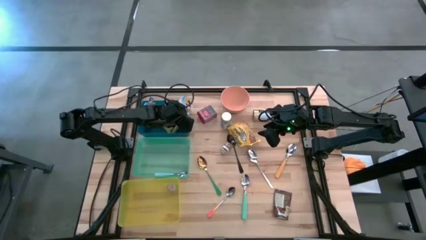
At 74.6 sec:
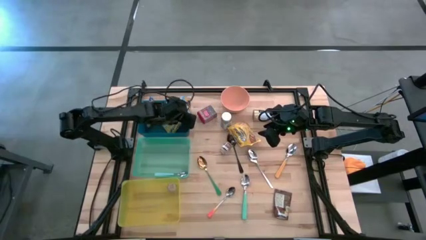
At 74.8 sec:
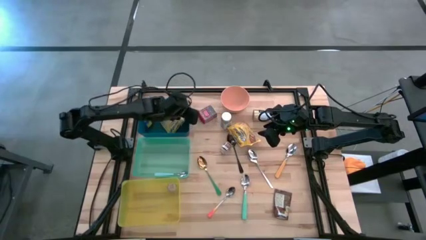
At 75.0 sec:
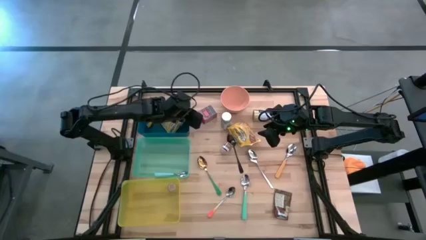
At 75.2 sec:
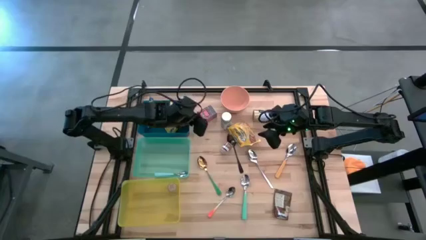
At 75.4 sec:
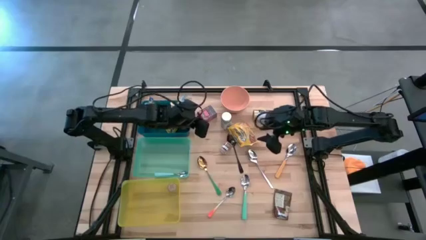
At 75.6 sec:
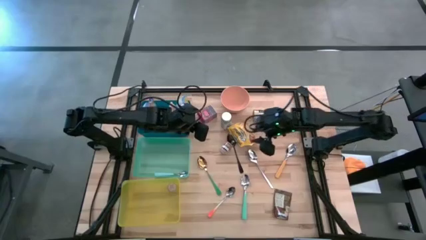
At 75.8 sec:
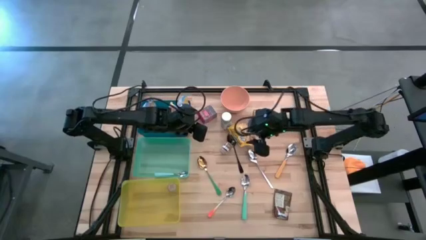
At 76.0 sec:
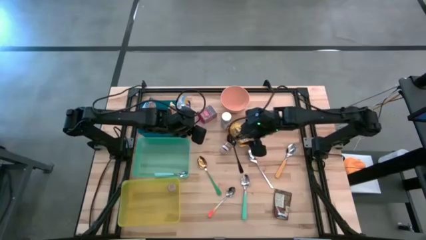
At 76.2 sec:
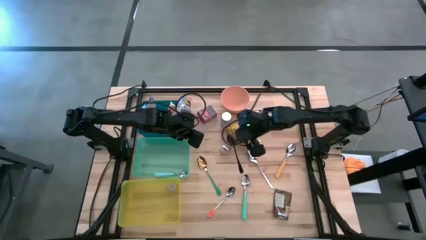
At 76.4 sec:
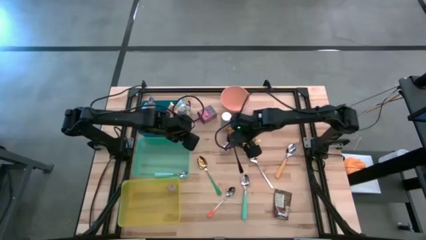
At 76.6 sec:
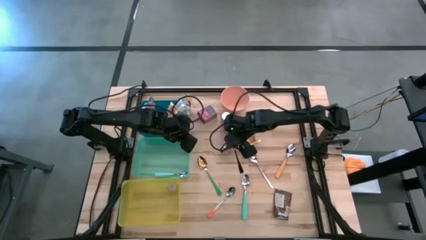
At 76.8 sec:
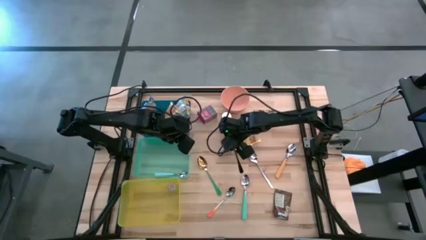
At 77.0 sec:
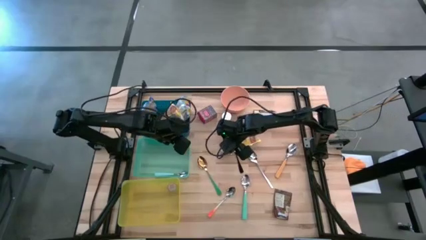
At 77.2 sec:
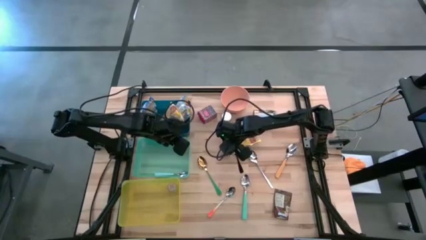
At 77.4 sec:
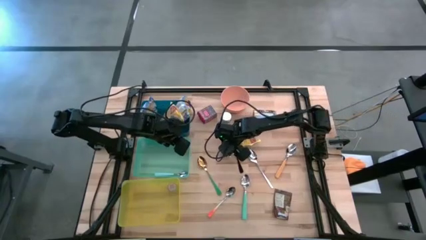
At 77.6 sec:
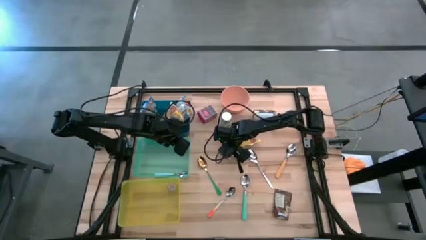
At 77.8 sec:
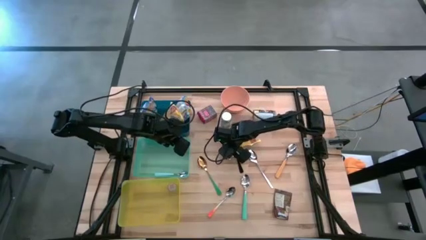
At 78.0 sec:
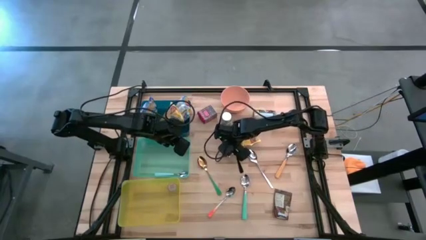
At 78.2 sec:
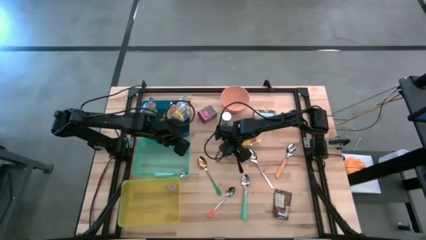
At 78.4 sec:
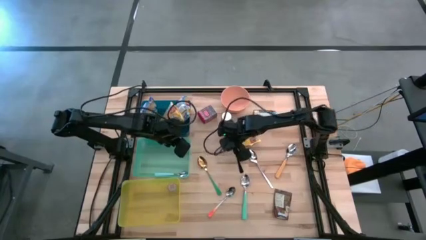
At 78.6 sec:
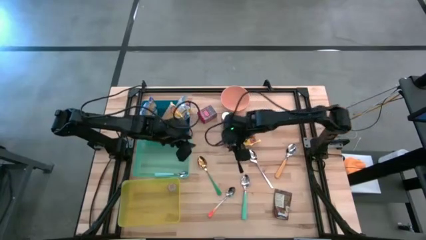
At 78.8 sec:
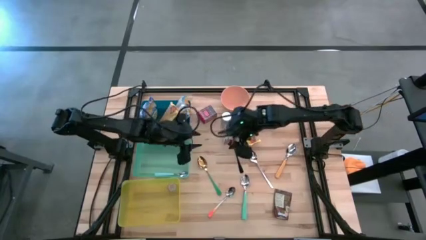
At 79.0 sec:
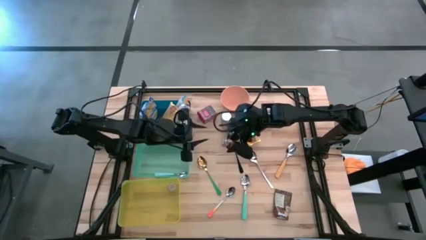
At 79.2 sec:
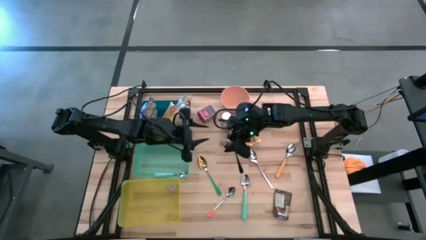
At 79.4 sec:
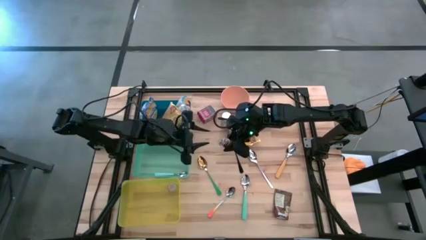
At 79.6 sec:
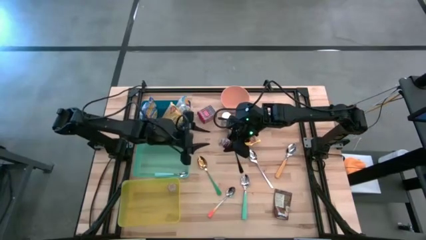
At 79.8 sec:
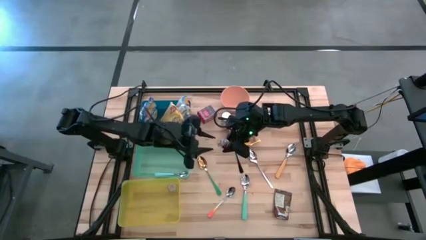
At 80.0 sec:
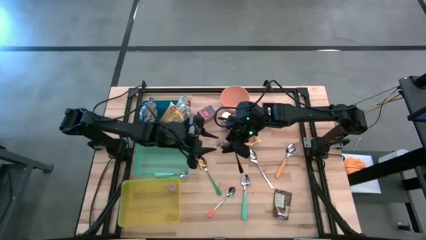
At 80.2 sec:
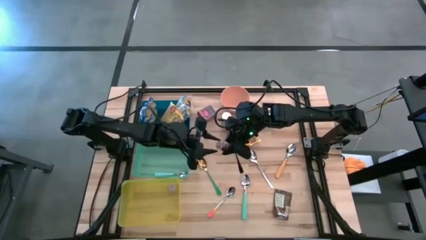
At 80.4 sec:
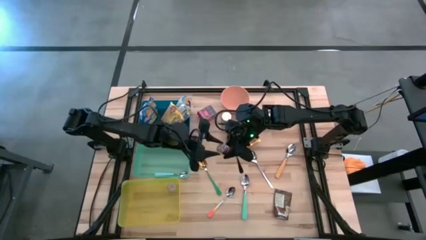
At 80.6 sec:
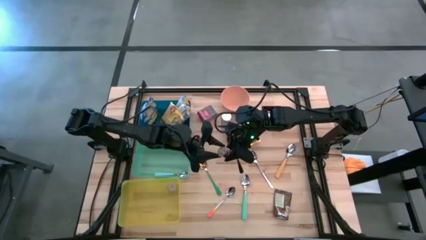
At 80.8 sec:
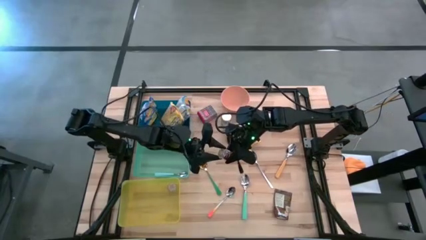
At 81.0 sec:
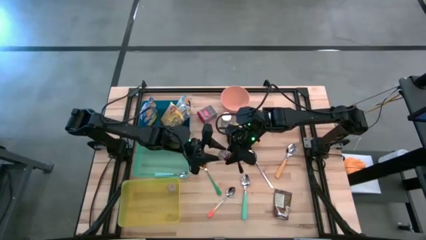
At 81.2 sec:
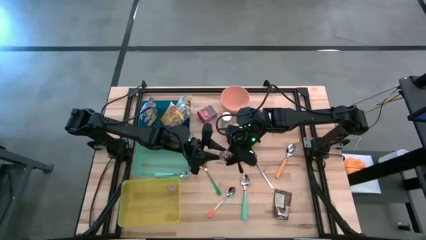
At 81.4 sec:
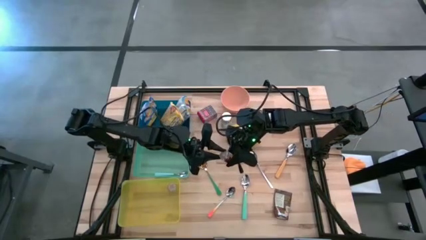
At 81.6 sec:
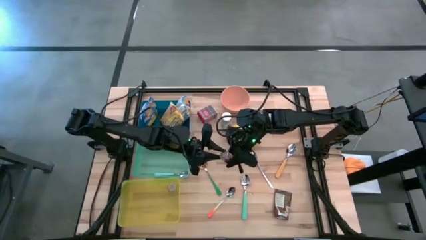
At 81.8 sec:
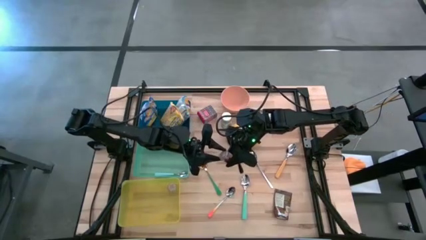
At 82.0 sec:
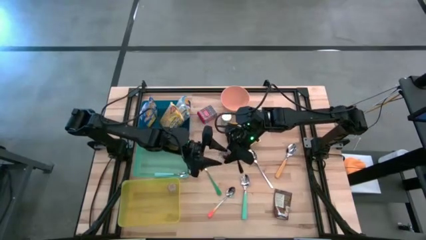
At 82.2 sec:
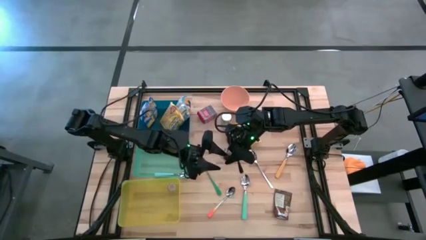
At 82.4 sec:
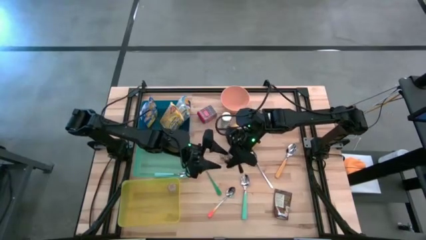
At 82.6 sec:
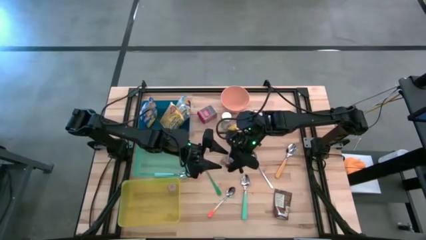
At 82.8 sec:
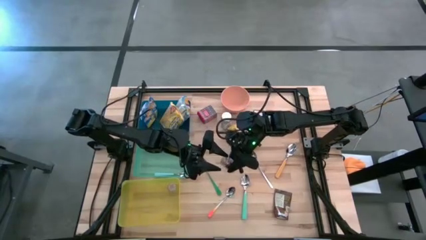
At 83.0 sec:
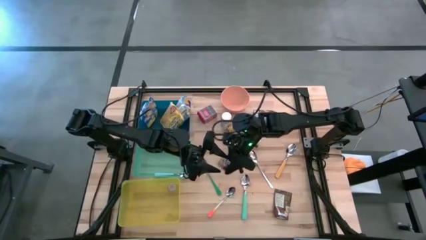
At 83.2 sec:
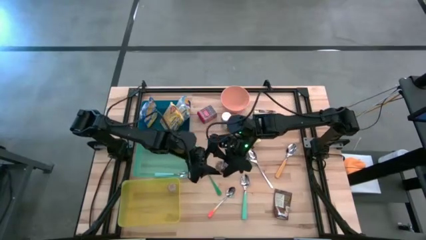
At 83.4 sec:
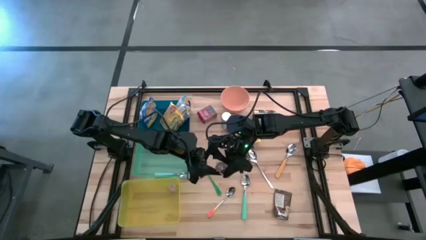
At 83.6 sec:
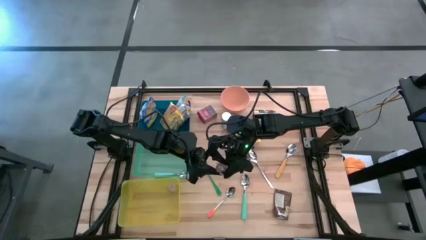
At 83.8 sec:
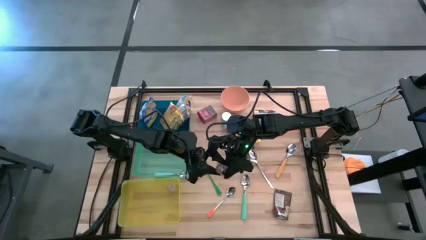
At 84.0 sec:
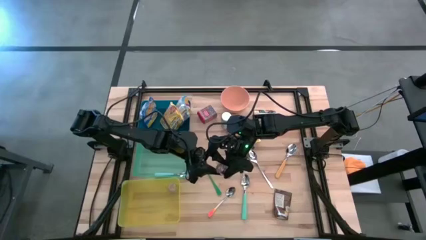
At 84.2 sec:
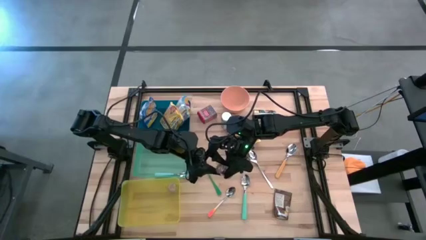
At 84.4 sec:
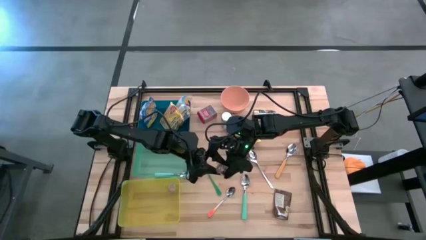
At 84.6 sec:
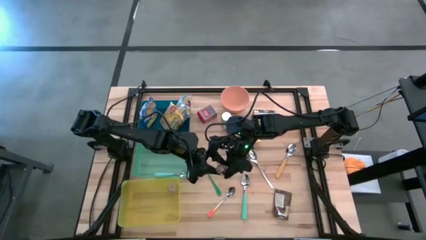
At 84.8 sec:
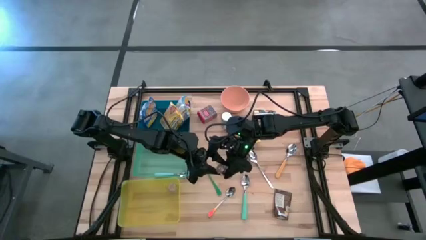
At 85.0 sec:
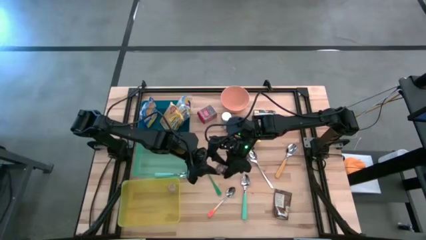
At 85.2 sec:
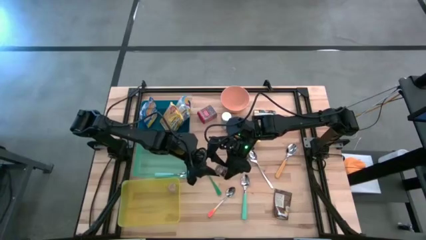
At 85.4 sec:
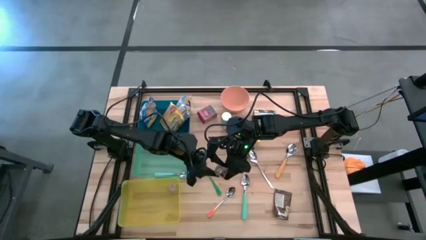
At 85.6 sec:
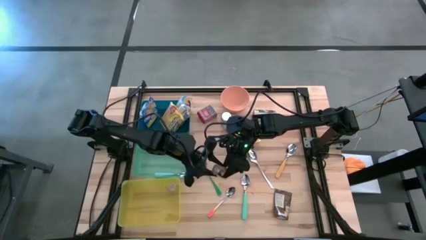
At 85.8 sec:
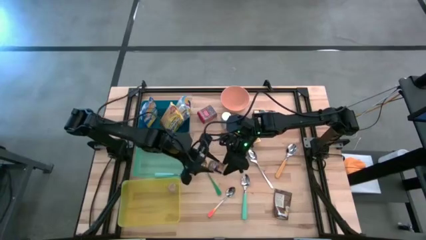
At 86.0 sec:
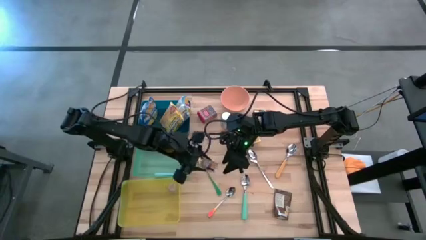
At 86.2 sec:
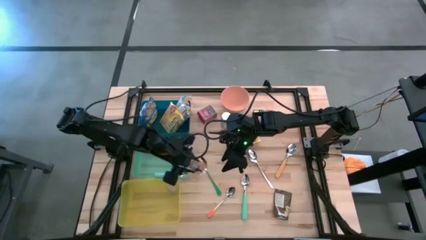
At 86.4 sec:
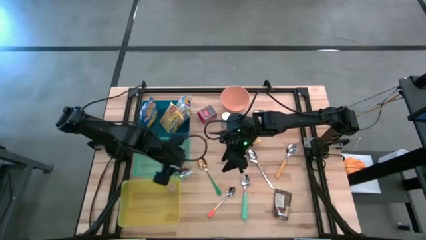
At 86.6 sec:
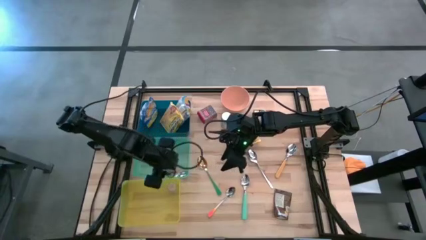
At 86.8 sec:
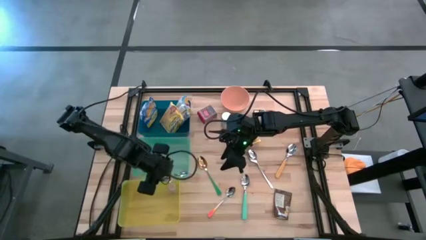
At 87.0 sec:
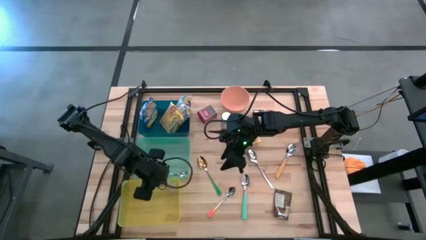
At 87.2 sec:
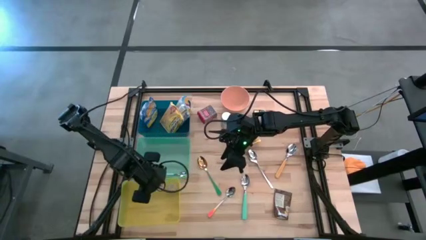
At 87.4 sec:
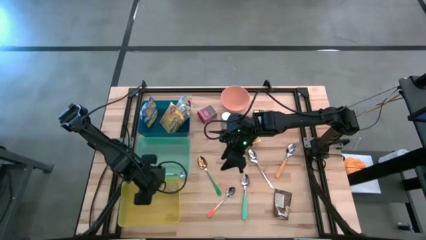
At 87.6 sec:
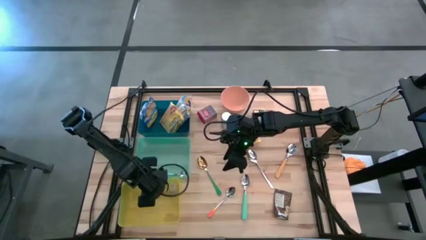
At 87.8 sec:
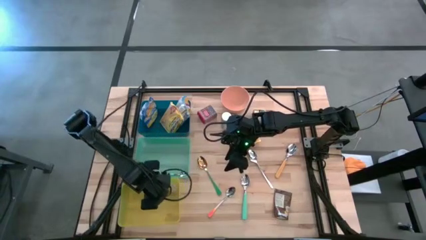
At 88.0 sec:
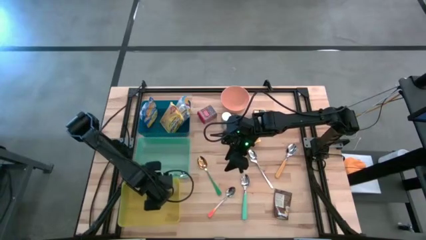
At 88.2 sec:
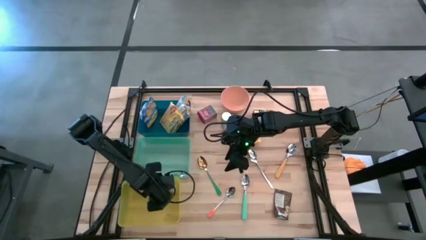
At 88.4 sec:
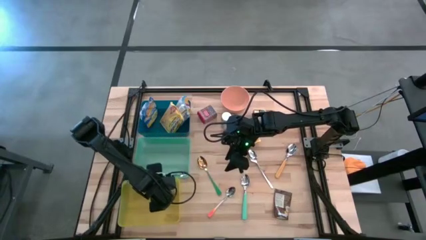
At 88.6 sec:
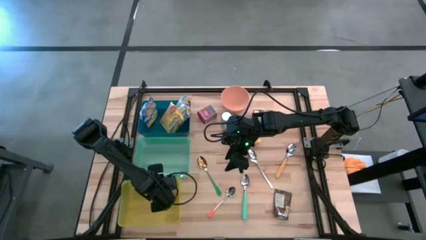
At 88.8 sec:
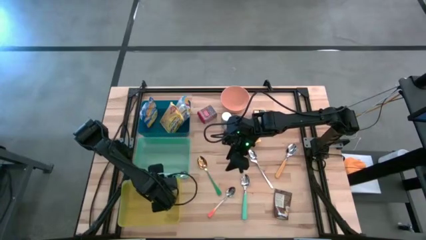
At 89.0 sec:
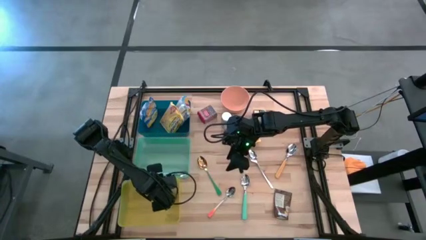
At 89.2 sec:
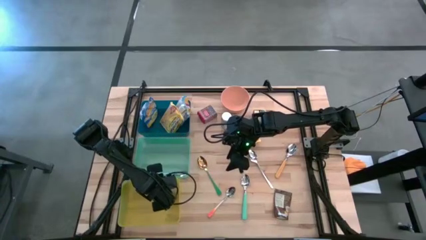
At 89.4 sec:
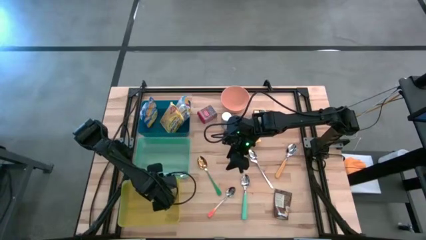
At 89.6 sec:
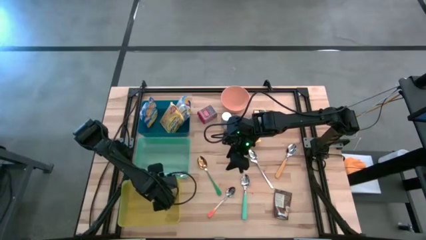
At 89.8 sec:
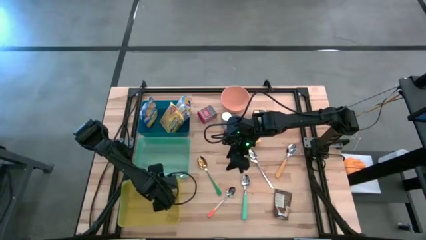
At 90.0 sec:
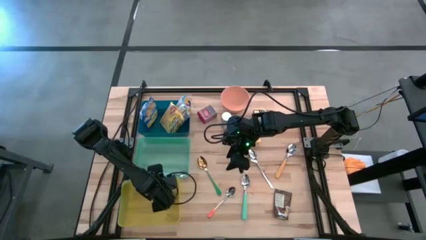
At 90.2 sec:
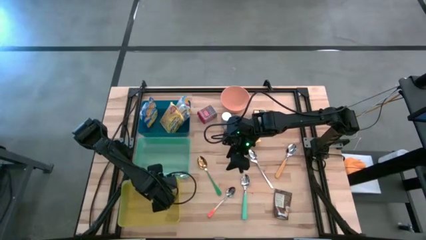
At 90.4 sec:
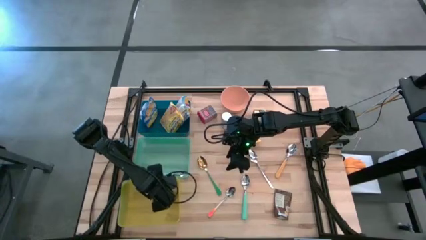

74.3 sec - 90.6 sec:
Put the seasoning bottle into the yellow bin
